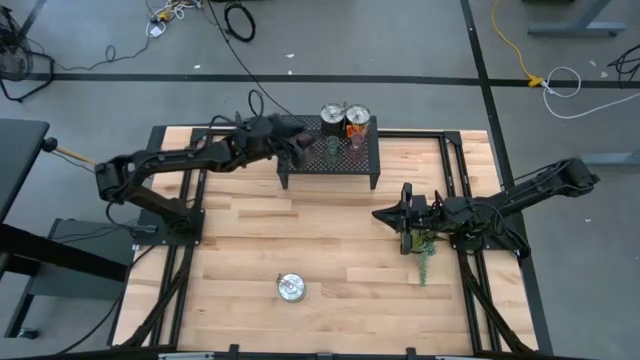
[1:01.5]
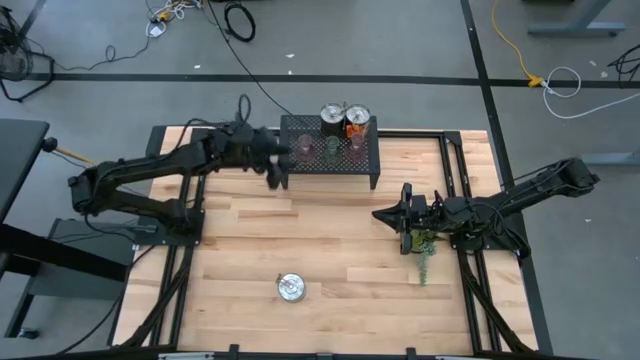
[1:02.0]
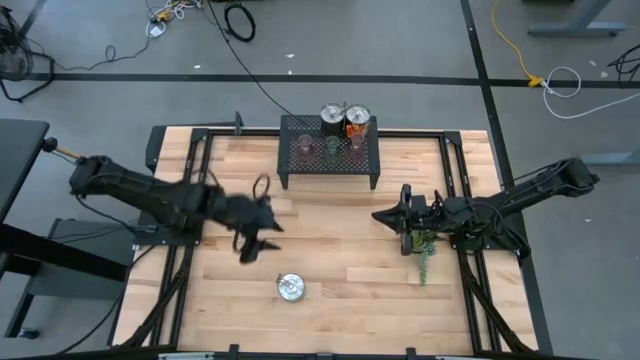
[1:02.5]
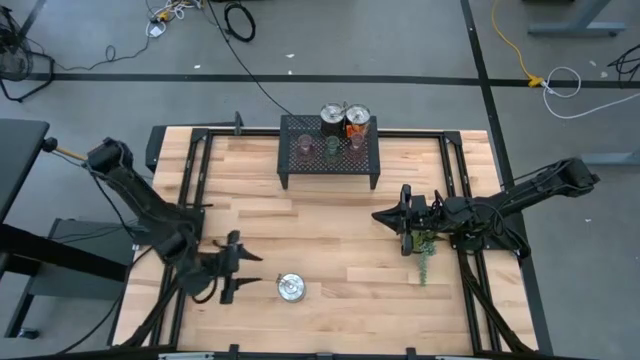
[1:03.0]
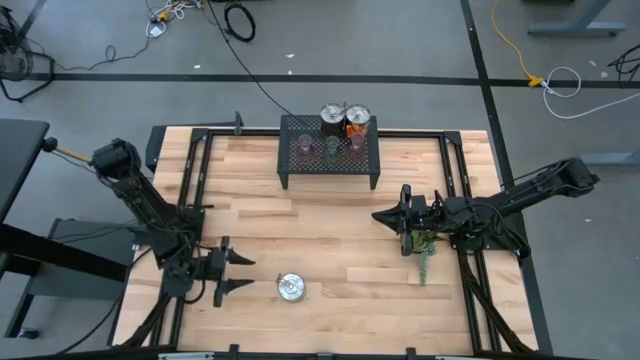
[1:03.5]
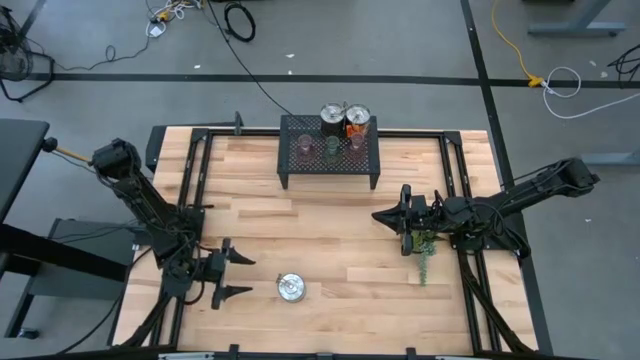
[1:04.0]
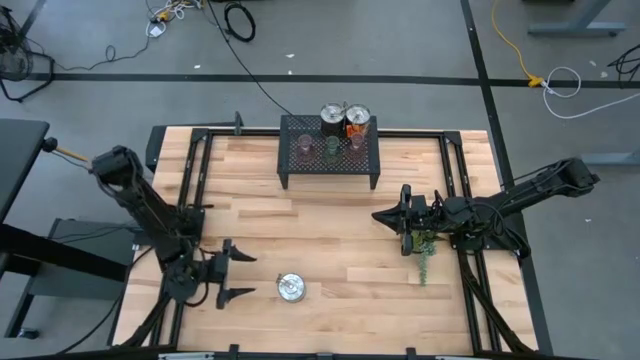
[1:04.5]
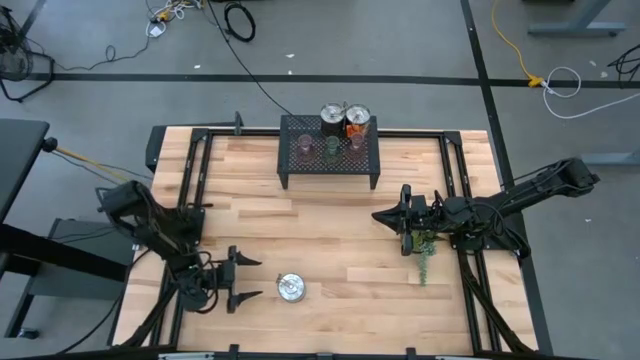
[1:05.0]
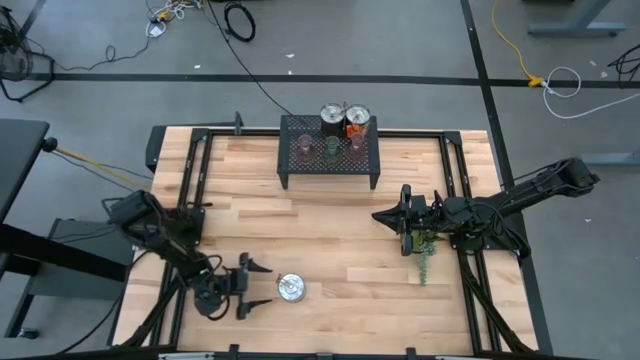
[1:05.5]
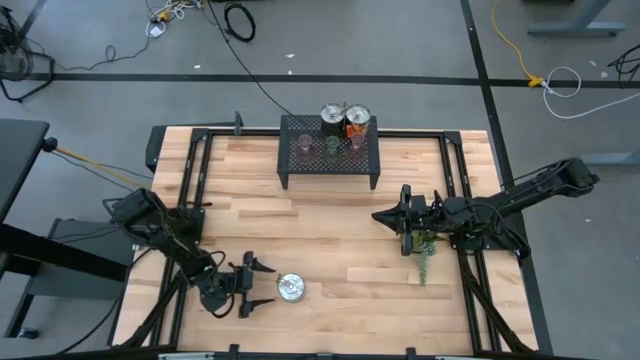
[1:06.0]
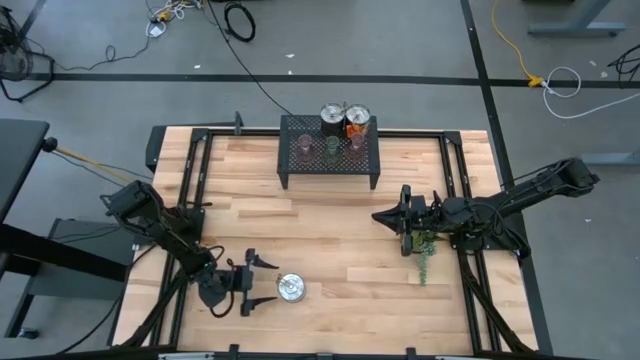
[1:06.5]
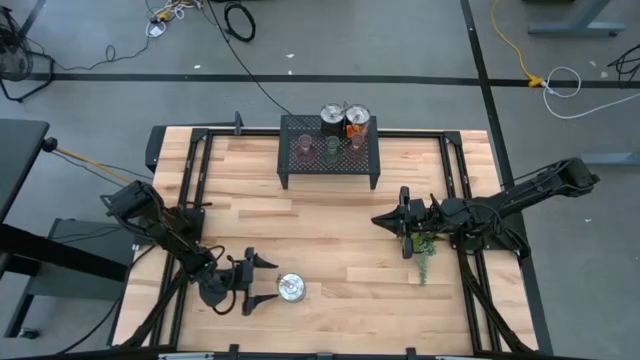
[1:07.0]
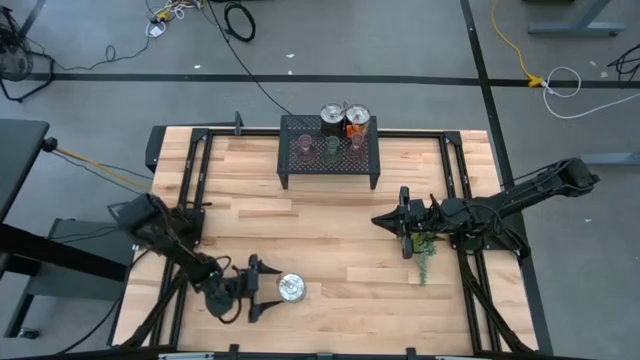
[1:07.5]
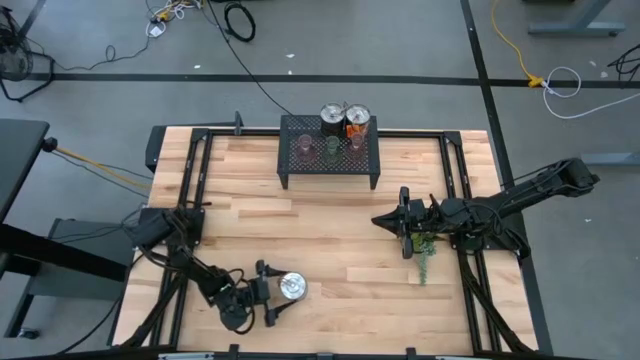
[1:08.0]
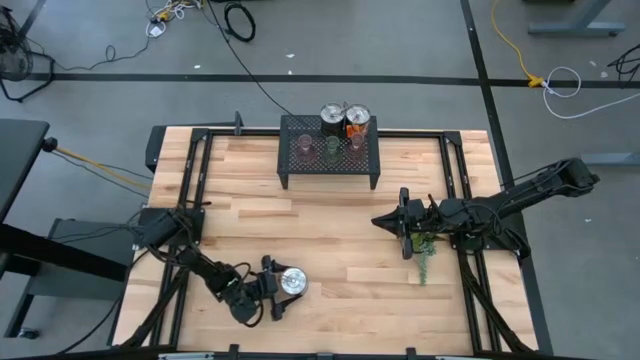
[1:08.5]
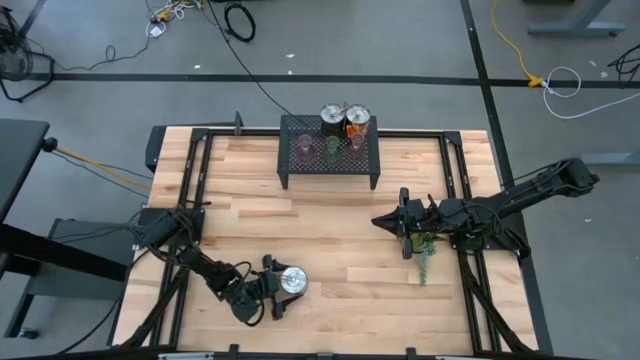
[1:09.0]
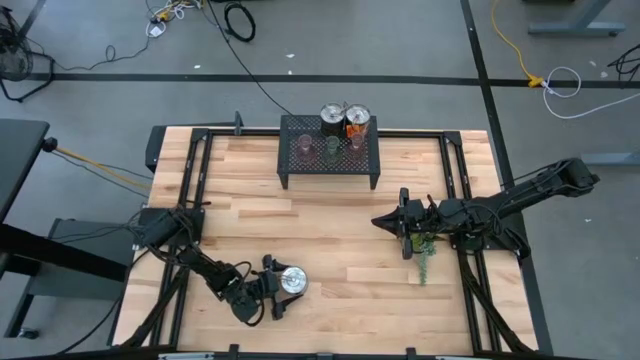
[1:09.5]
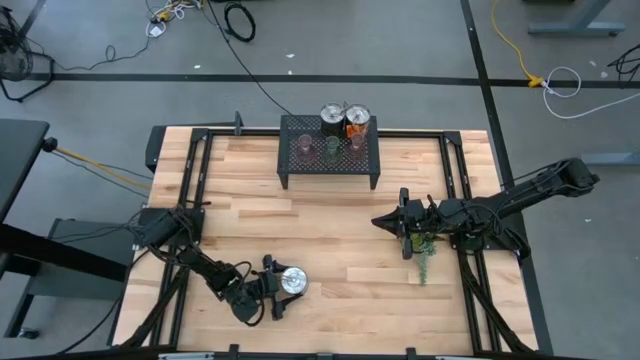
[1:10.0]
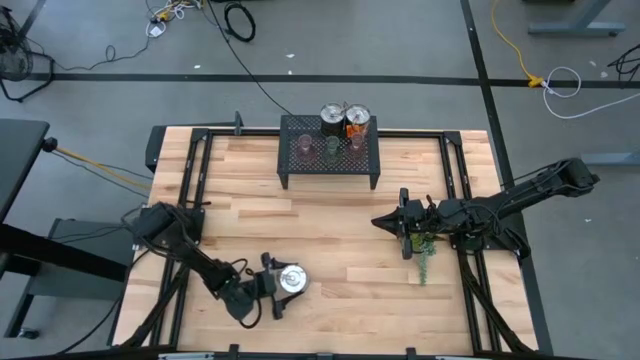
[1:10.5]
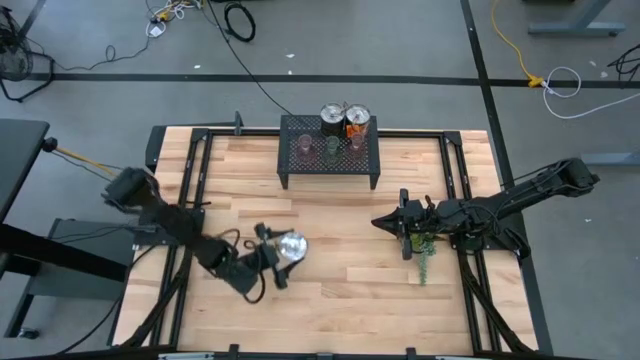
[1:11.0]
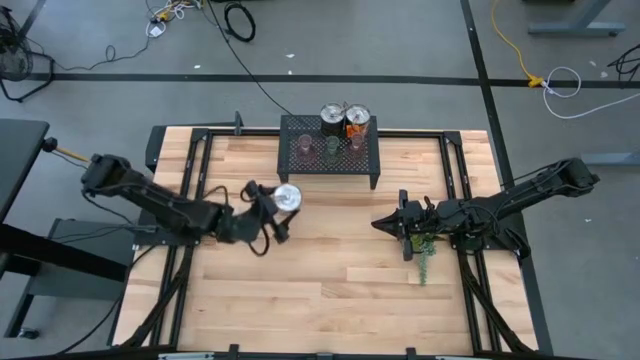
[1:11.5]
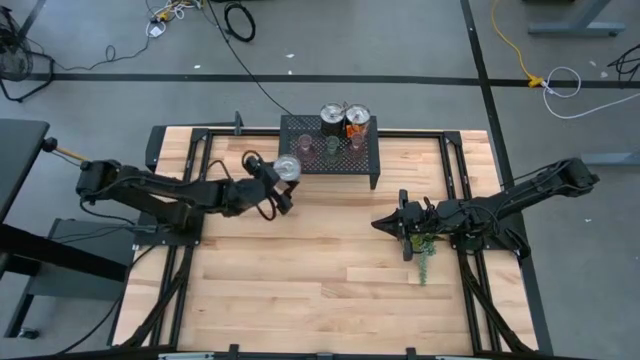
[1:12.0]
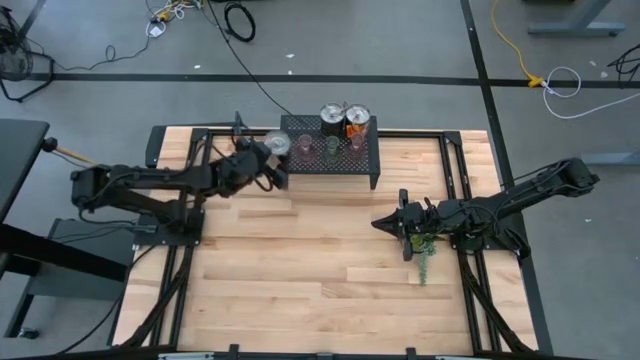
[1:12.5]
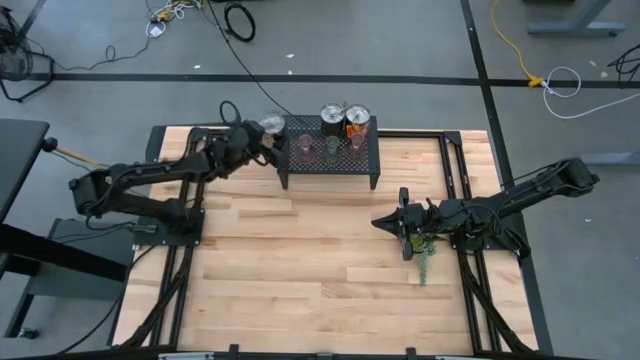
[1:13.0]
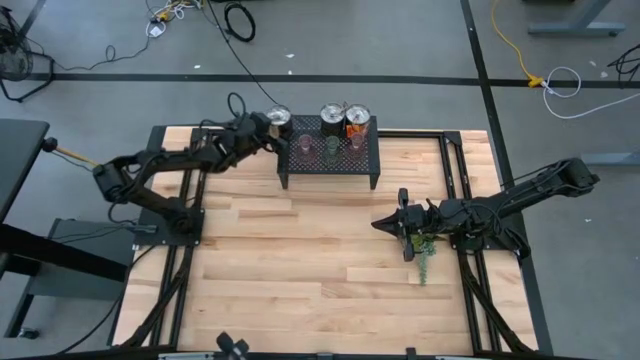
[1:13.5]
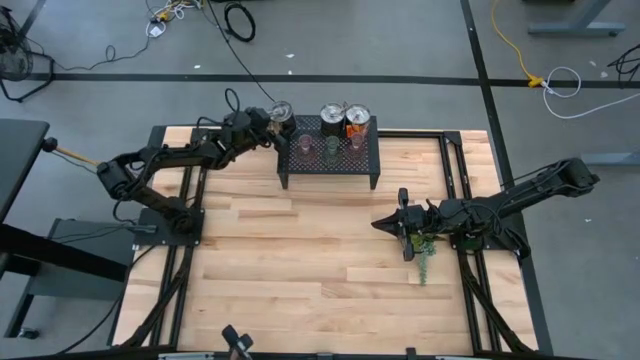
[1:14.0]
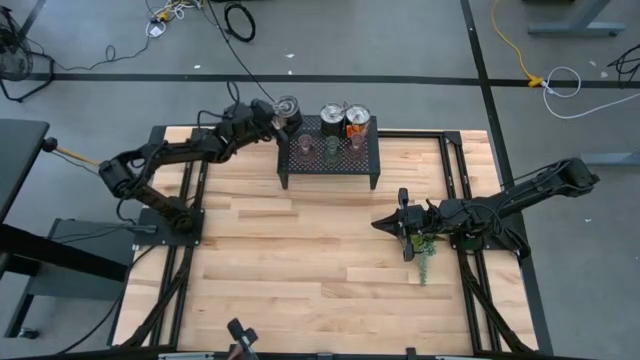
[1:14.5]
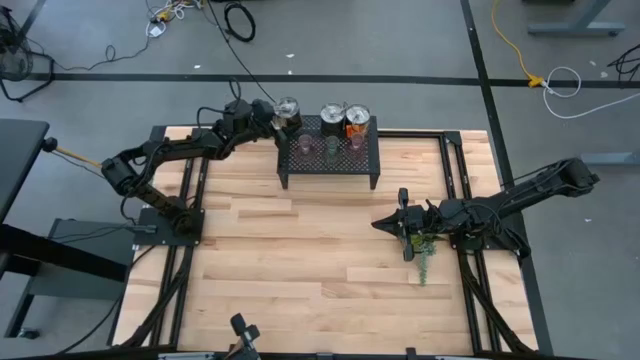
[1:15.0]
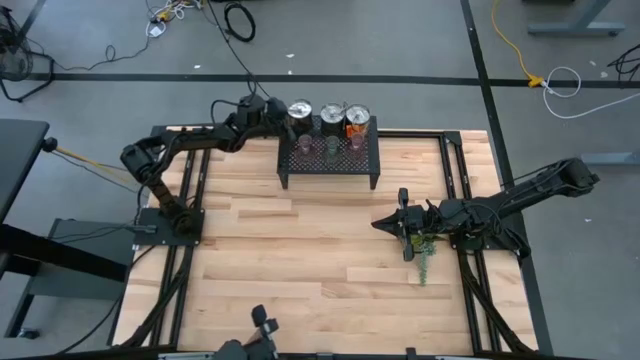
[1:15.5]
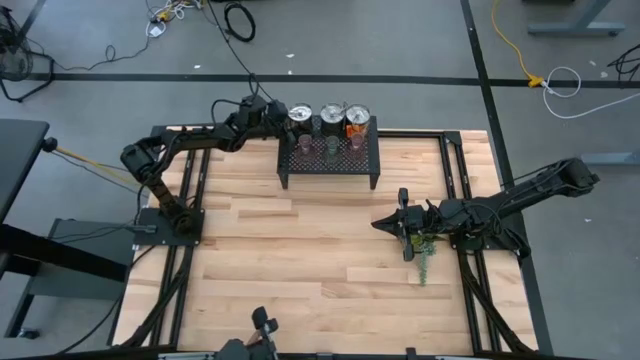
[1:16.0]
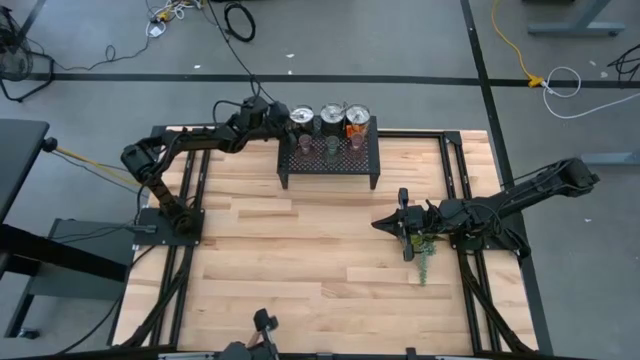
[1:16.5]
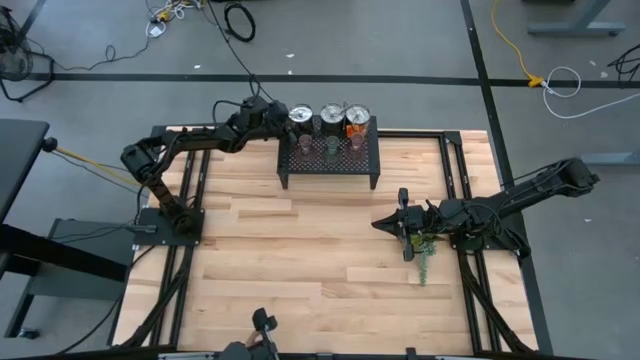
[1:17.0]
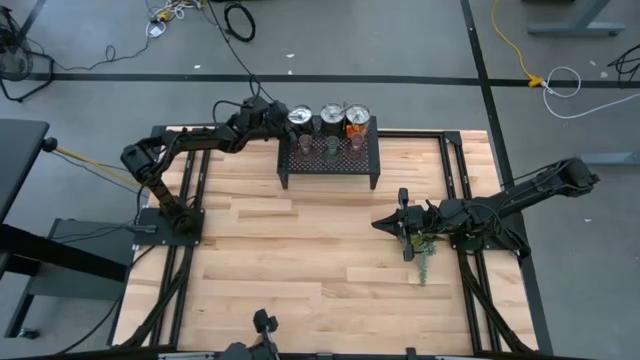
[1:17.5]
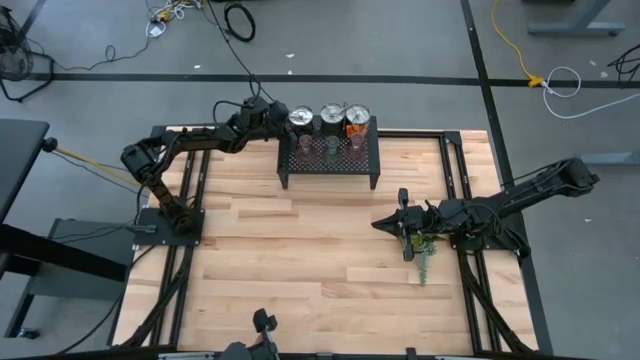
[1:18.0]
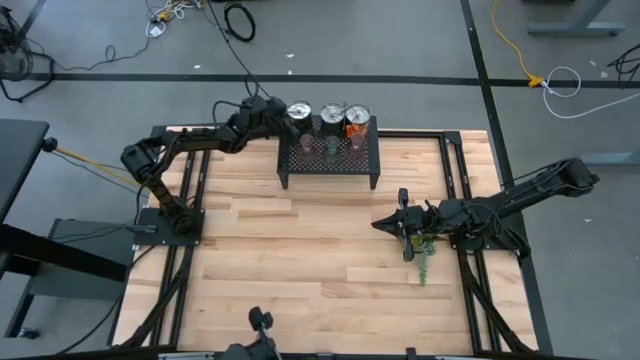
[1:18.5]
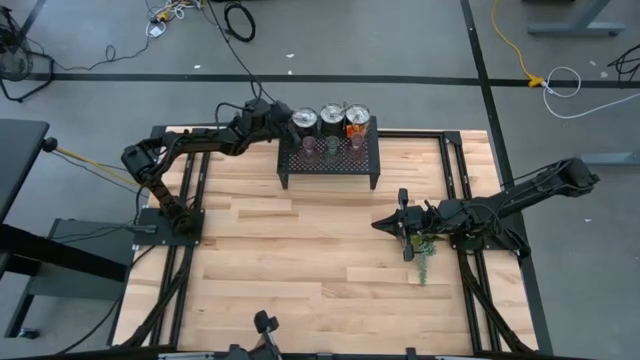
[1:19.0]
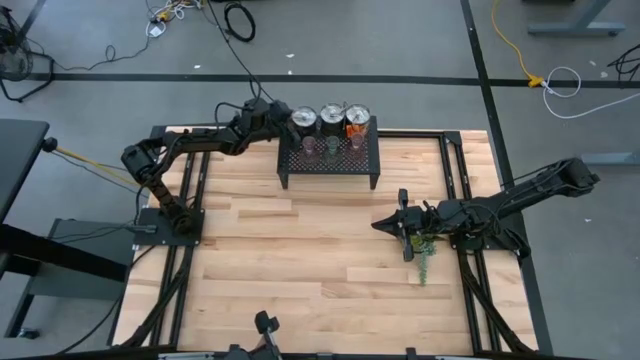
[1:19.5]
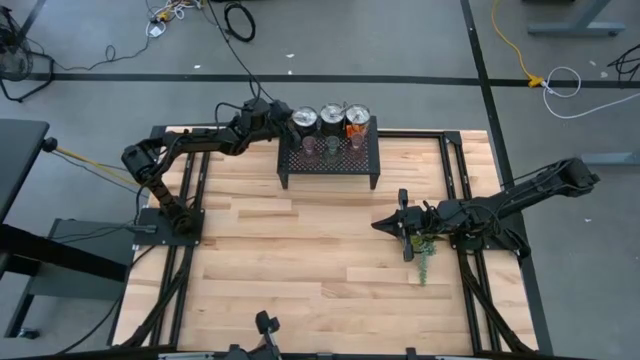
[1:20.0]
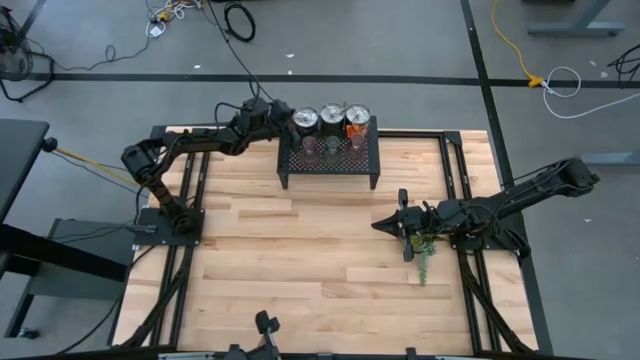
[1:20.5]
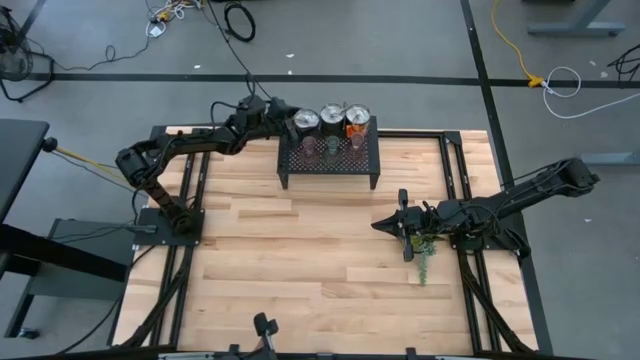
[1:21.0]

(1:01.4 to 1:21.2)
Task: Pick & Place candle stick holders
Put the brown scented candle on the shelf

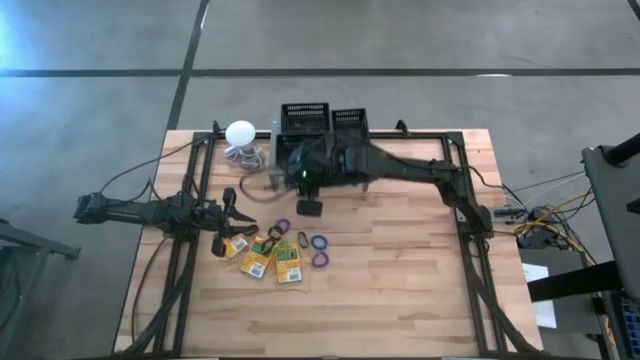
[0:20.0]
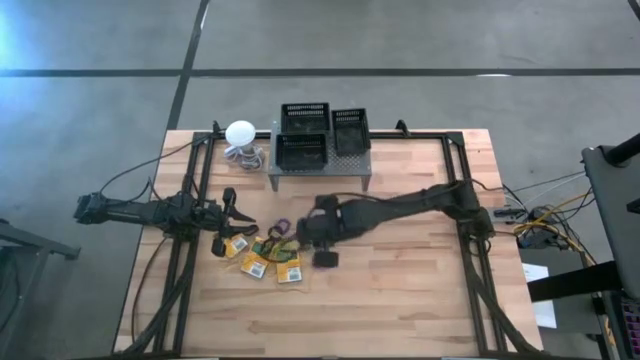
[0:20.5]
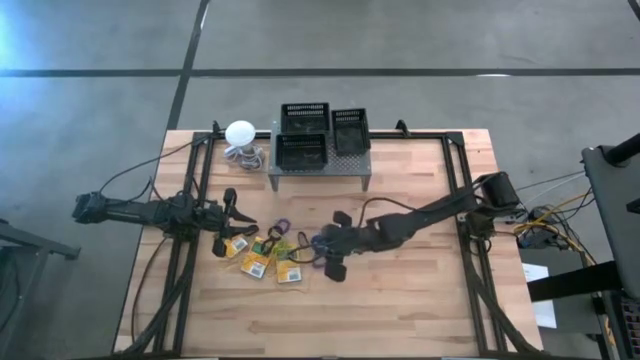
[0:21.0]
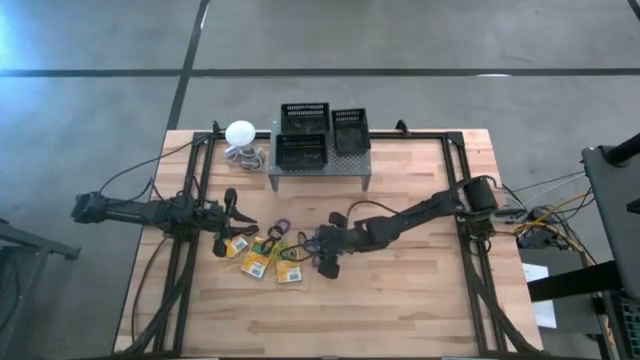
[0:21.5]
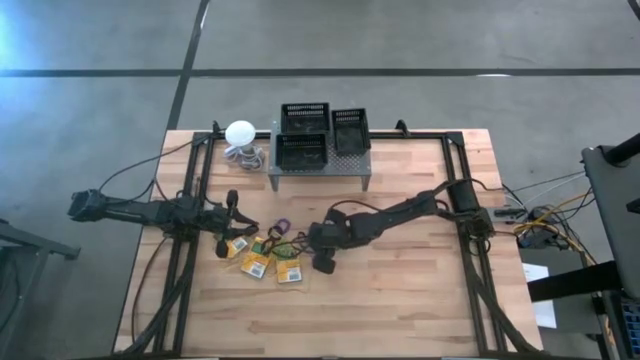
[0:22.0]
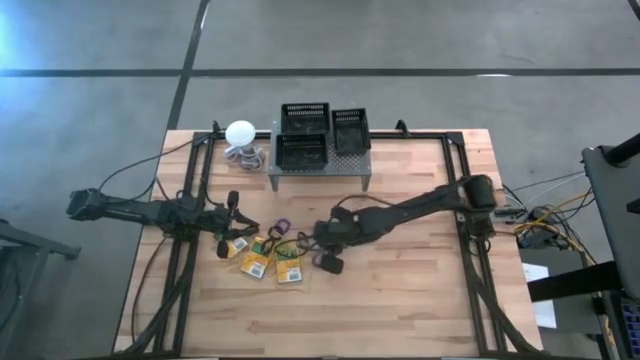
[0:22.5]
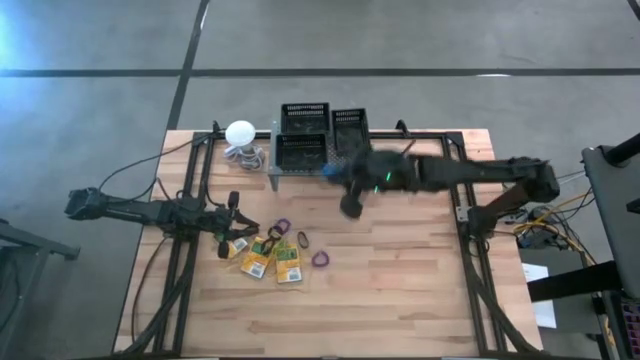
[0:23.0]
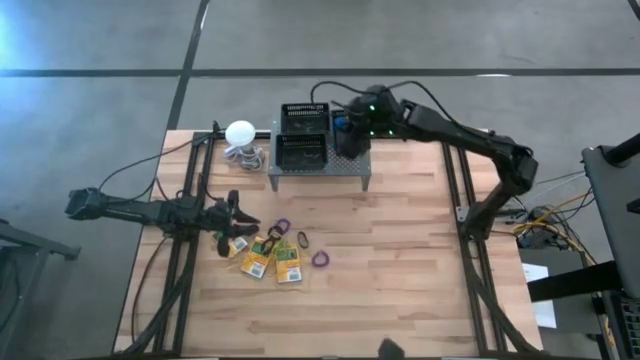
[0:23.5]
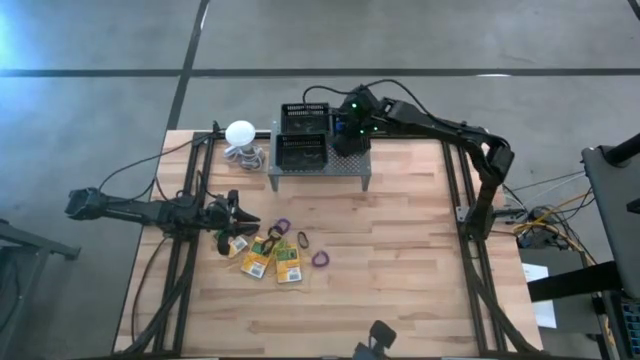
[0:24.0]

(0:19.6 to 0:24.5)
Task: Pick & Place Office Desk Supplies
Put the blue spring keychain into the right black bin on the shelf
